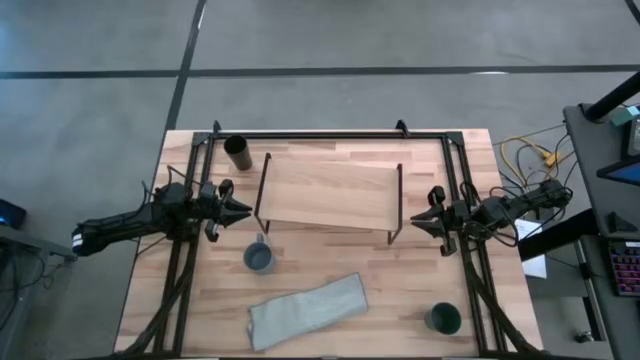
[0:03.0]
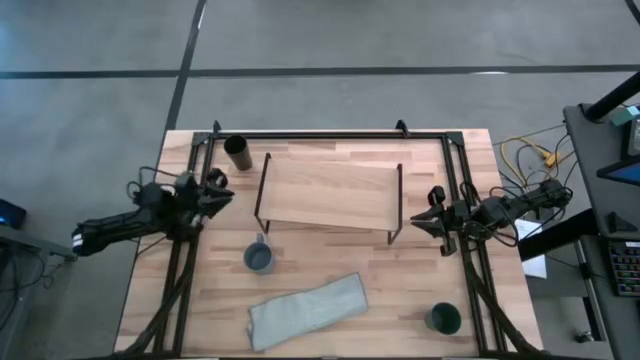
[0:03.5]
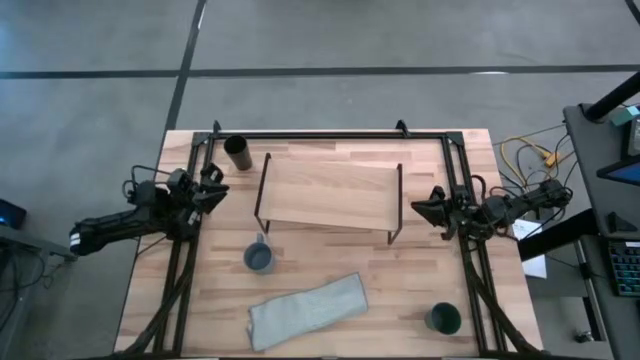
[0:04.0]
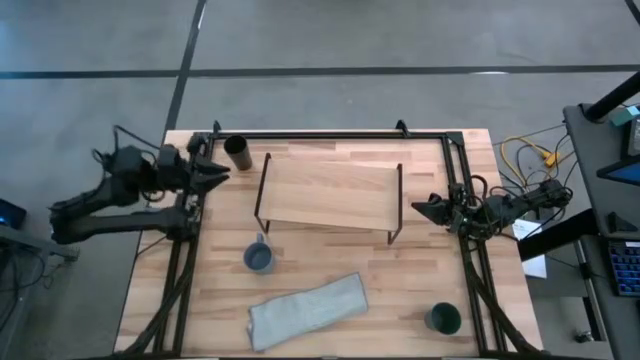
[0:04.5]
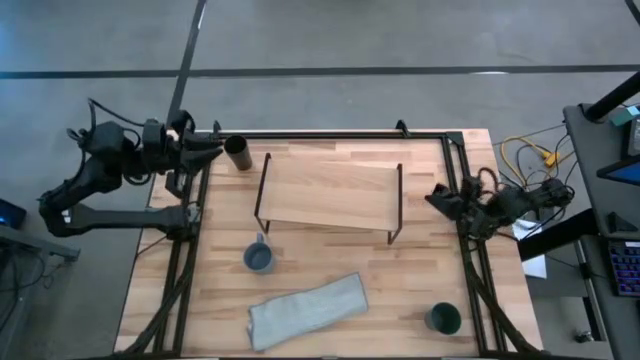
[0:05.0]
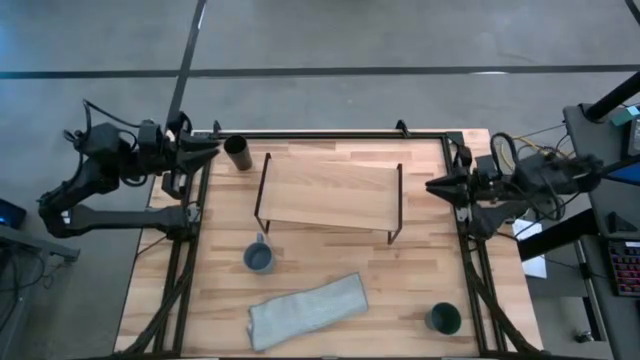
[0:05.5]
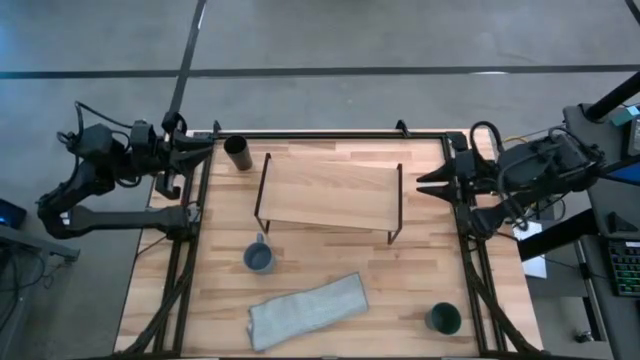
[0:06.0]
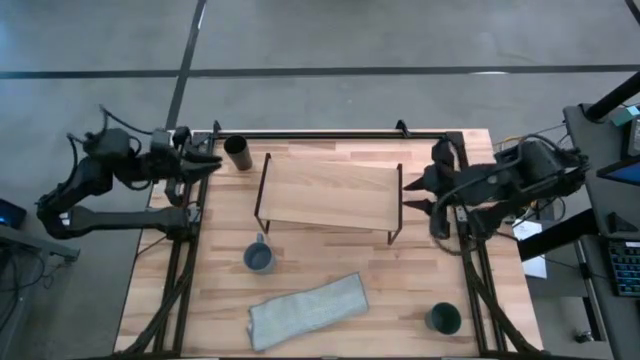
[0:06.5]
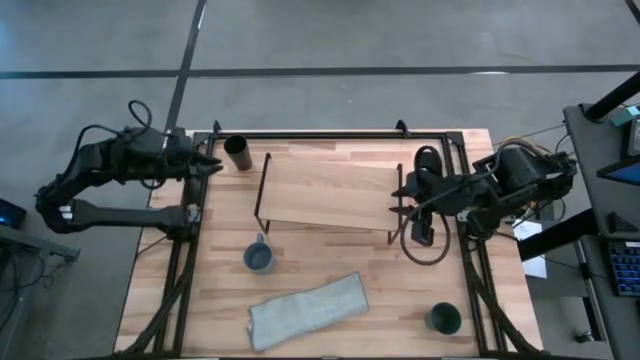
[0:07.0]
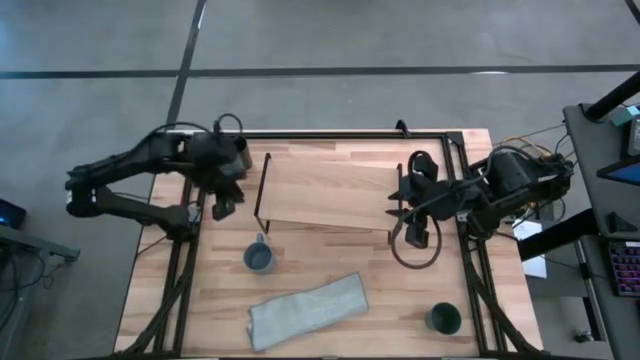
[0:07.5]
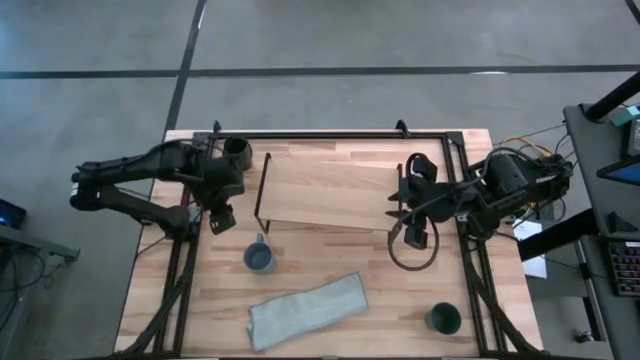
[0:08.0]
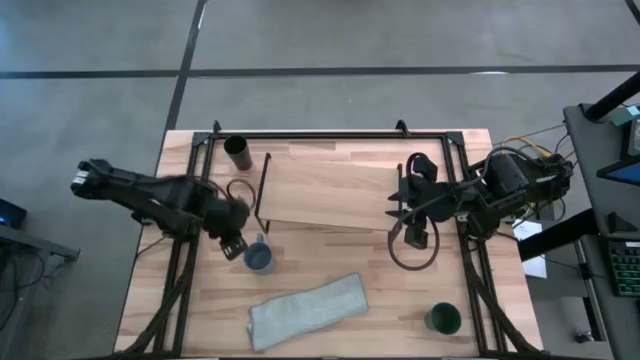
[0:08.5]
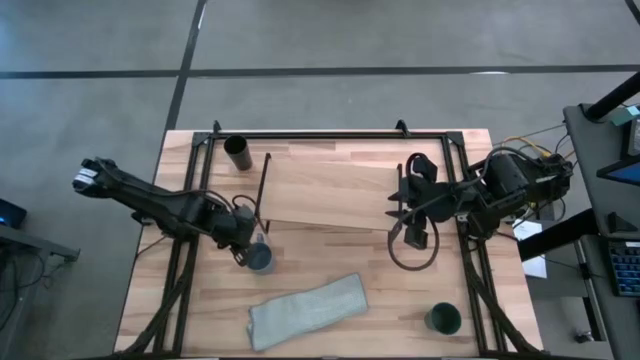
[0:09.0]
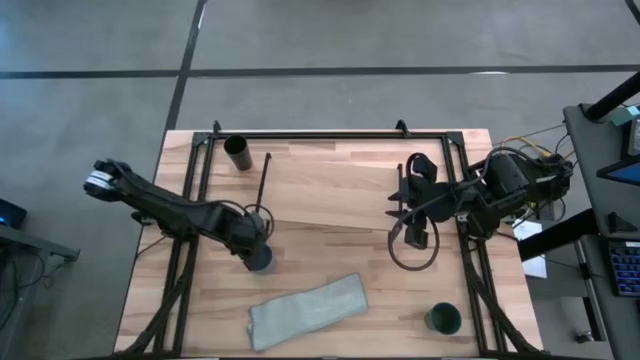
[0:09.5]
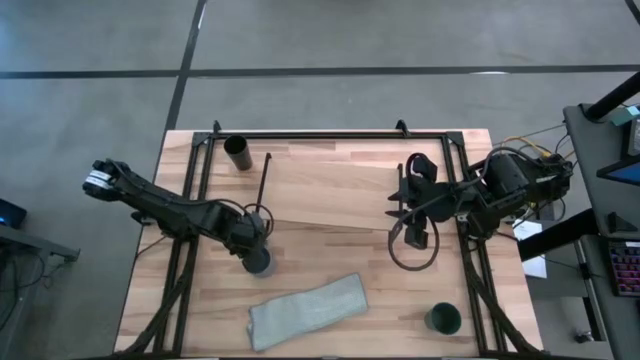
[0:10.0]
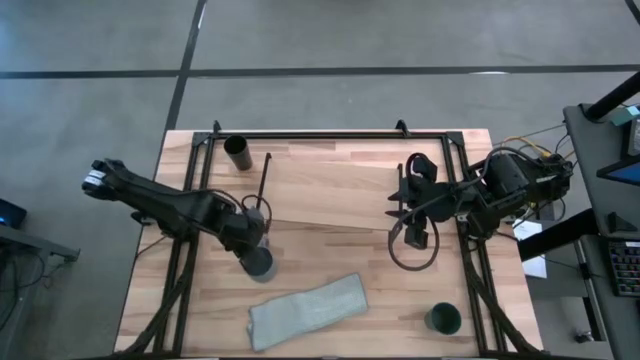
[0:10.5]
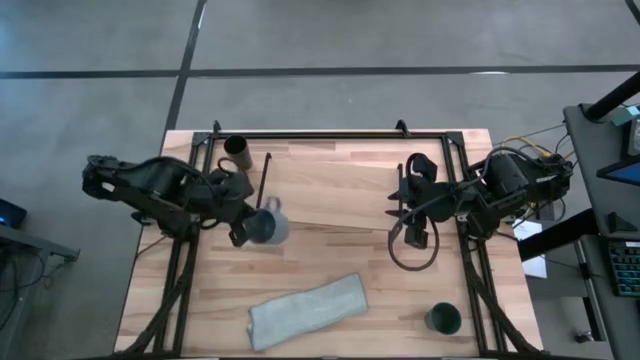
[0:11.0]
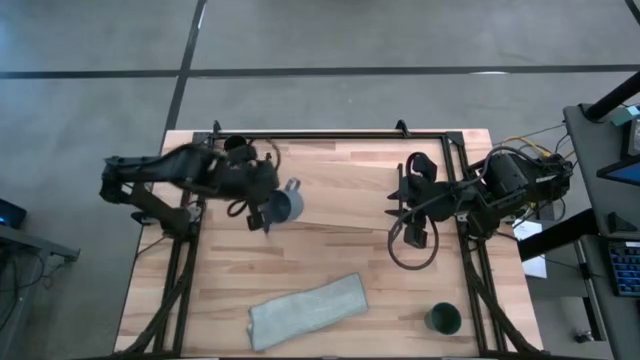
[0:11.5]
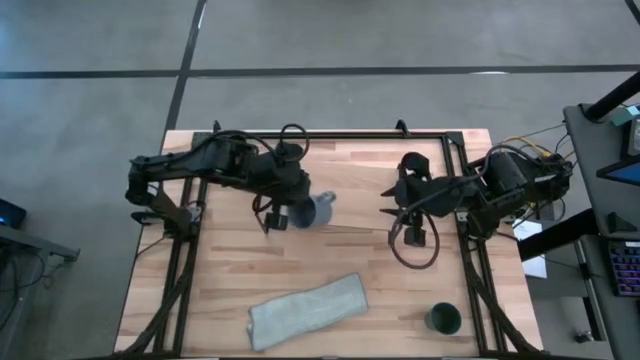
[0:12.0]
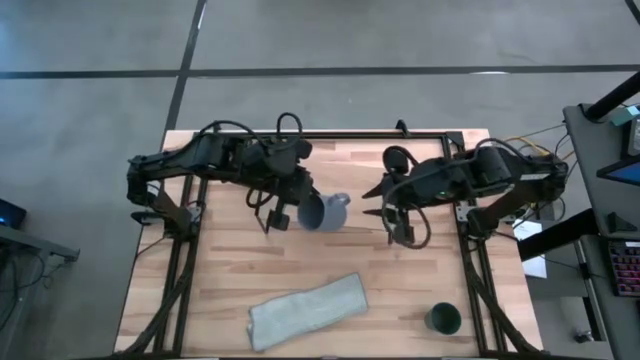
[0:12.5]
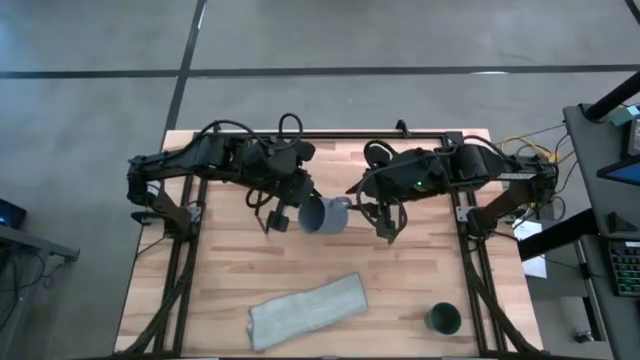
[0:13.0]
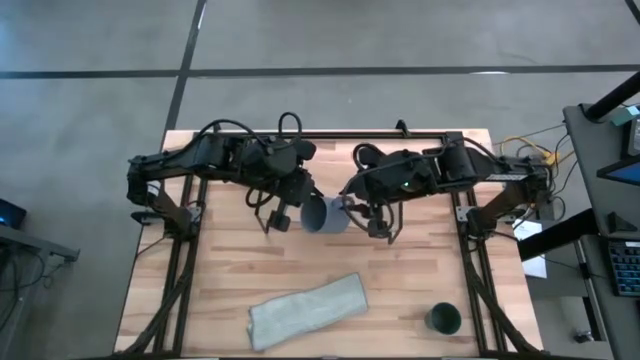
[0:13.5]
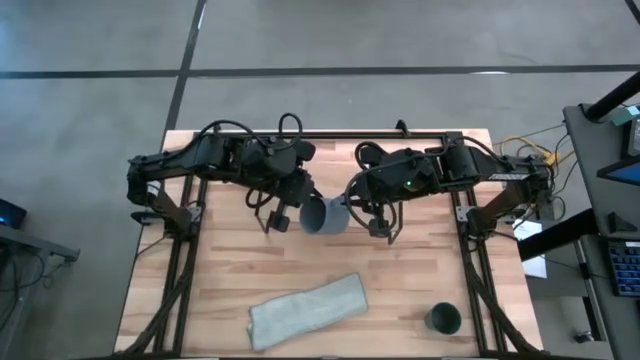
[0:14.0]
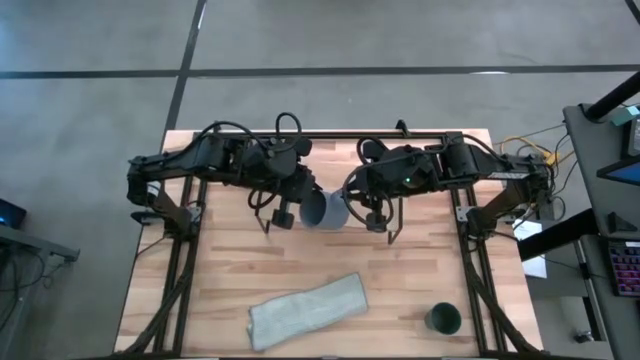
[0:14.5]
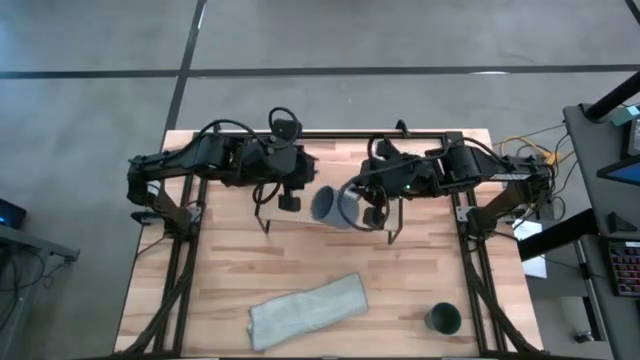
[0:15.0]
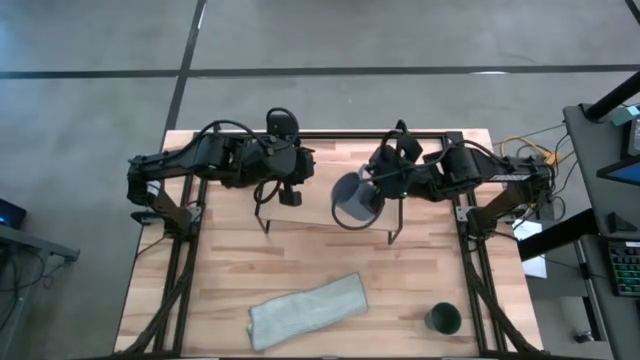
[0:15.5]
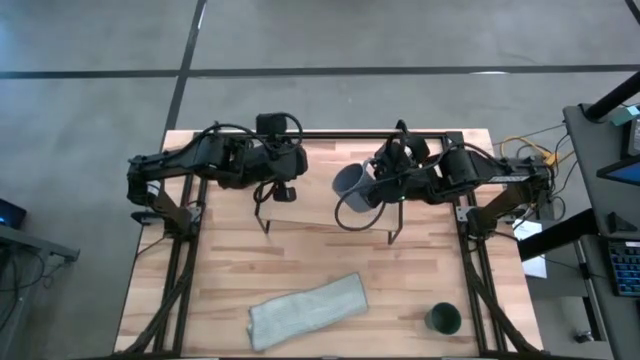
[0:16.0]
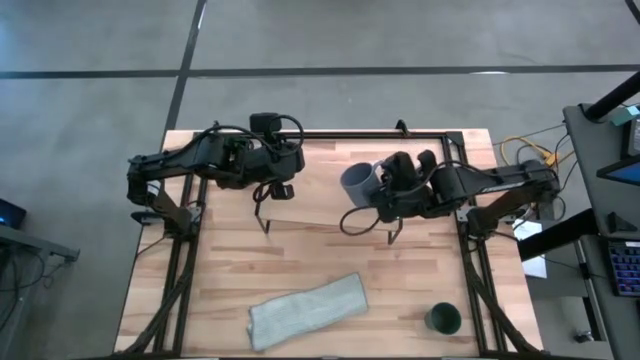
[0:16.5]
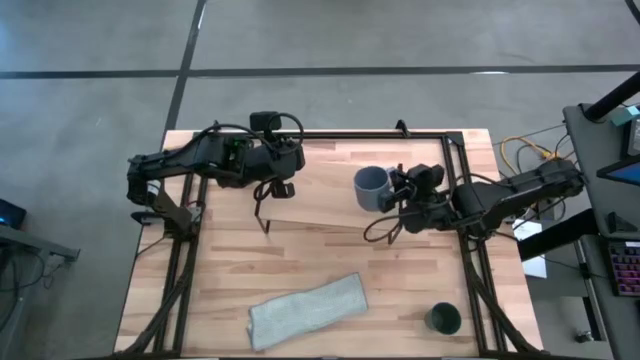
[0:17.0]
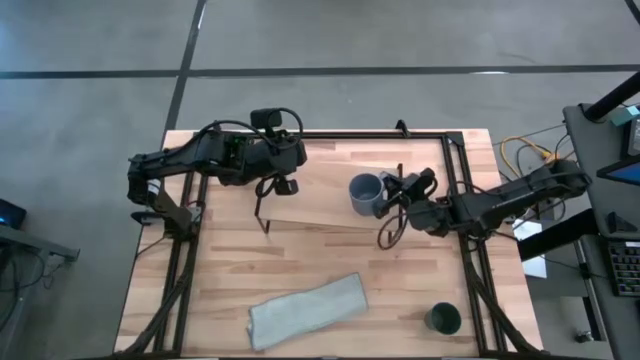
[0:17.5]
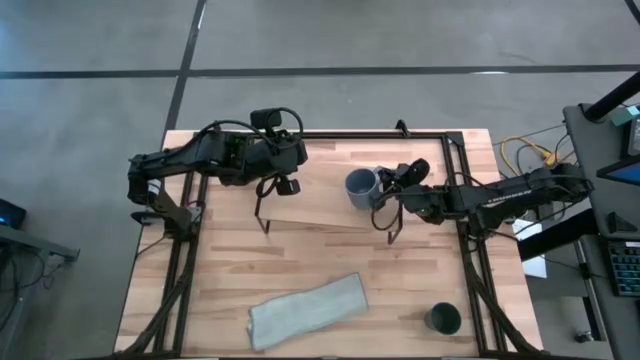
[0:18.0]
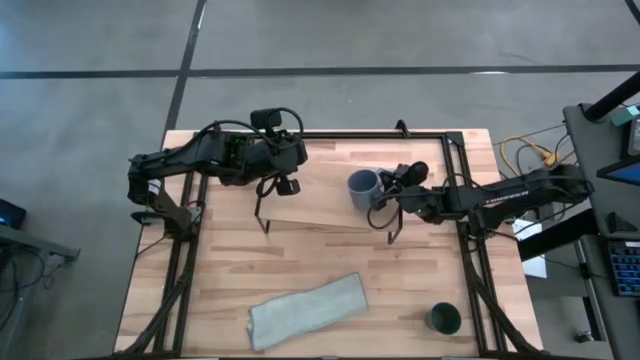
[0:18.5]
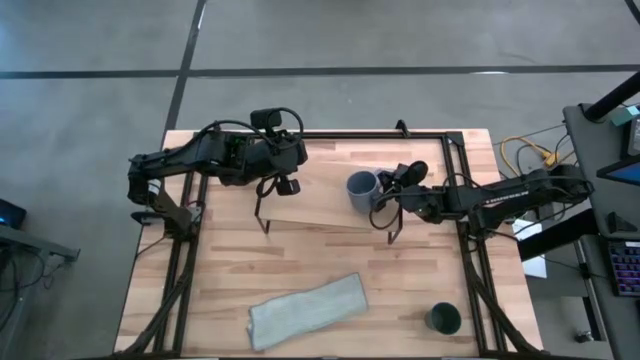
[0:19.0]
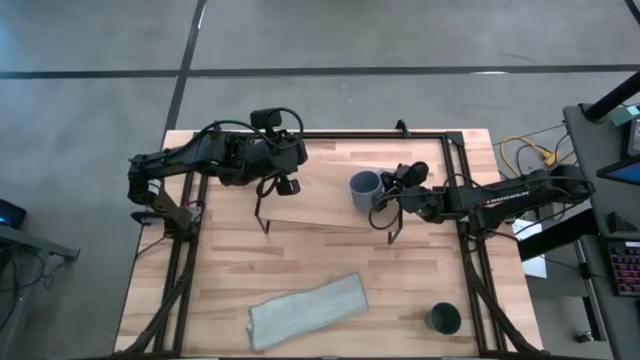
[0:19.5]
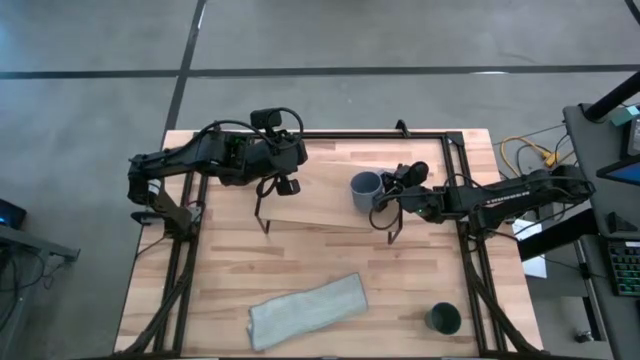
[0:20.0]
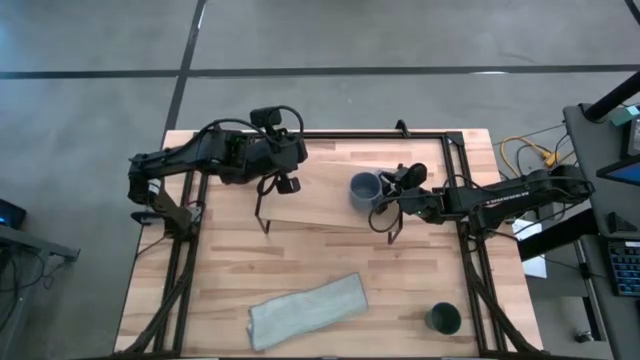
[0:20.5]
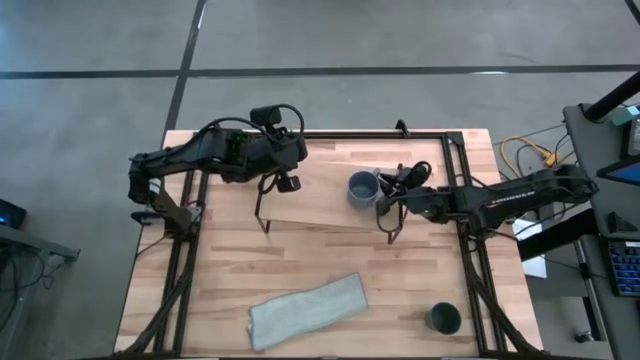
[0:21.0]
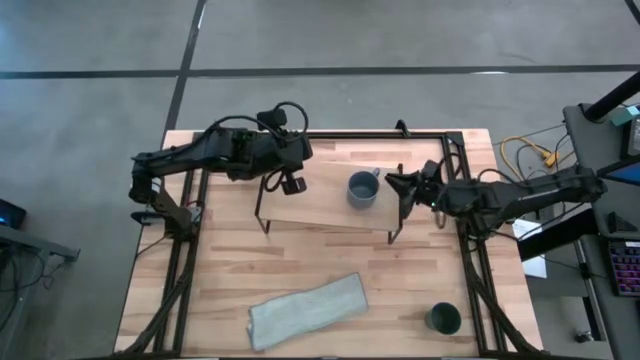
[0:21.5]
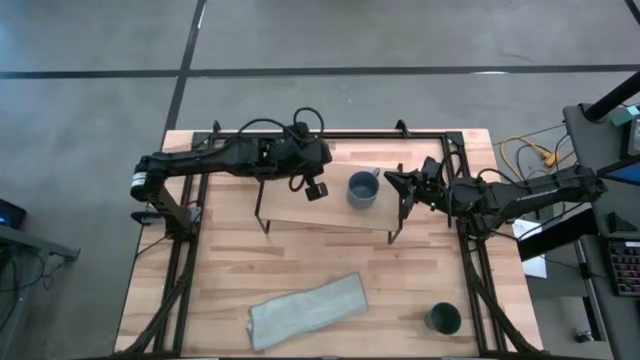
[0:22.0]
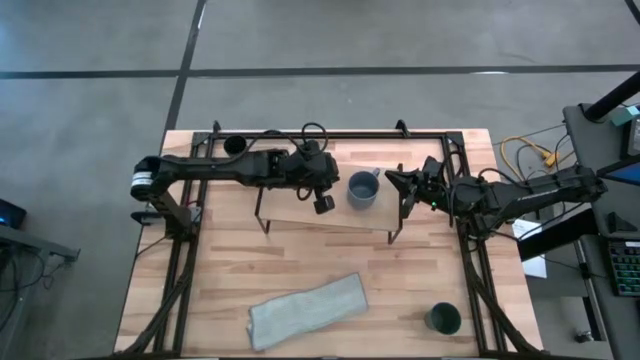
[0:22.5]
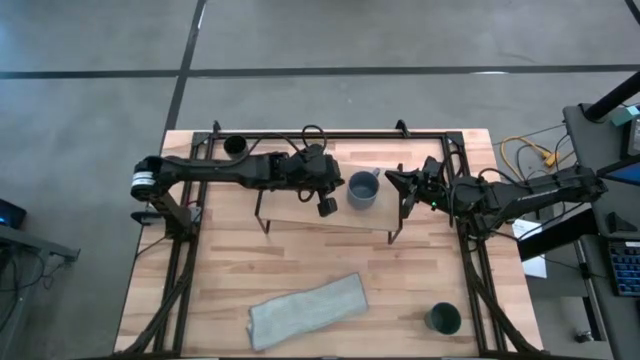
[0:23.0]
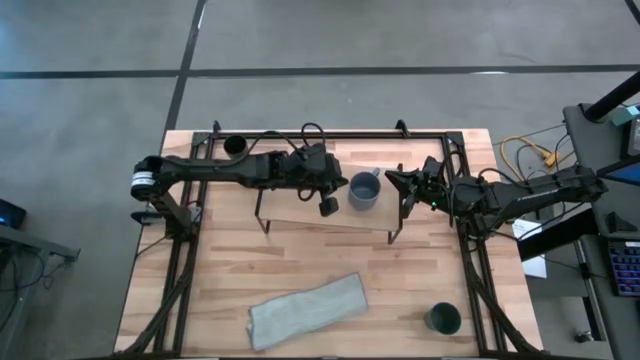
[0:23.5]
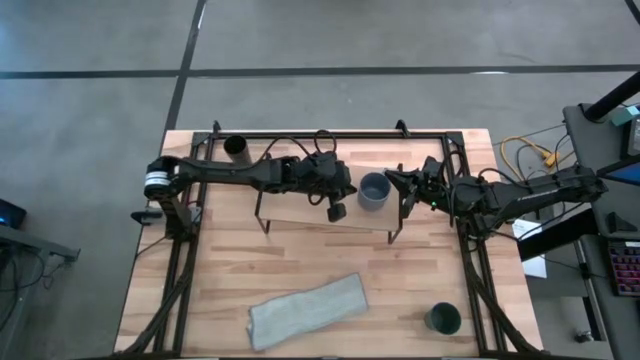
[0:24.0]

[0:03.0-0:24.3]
Task: Stack small to large cups/mugs on shelf
Put the gray mug on the shelf
